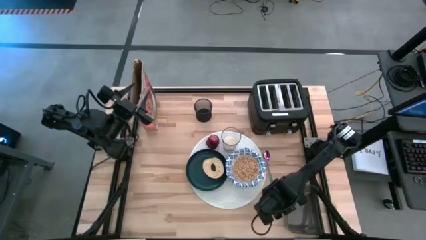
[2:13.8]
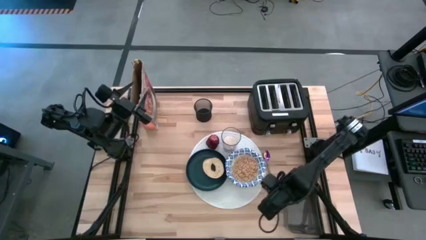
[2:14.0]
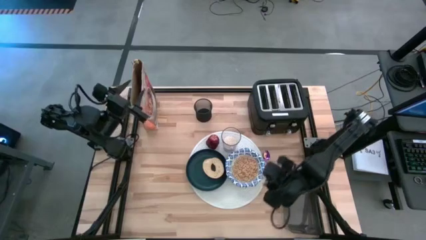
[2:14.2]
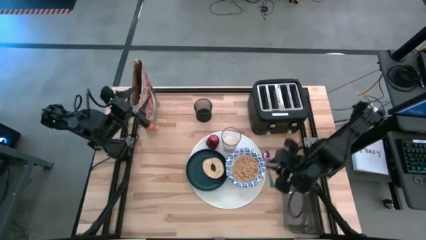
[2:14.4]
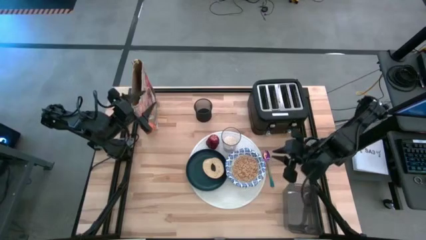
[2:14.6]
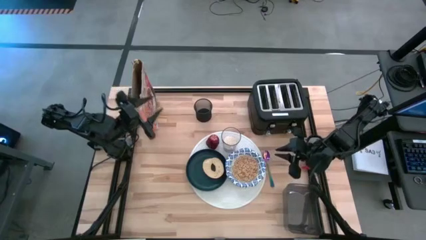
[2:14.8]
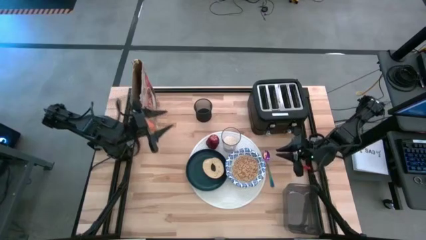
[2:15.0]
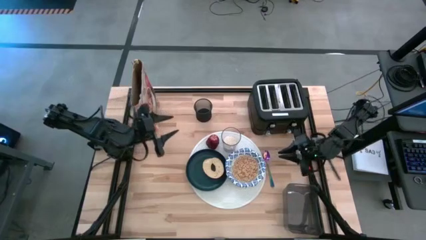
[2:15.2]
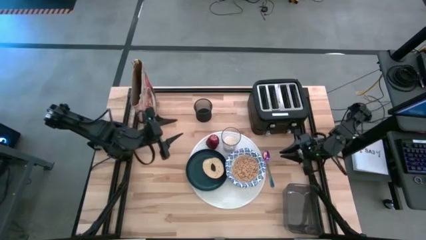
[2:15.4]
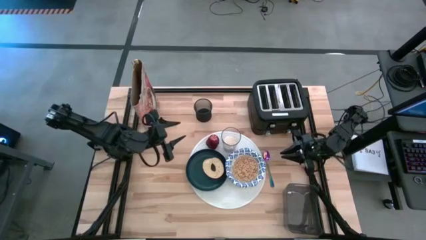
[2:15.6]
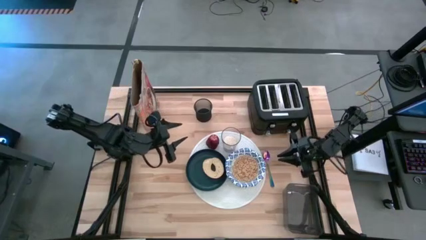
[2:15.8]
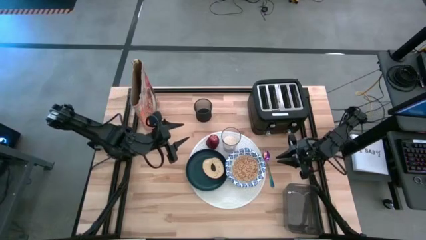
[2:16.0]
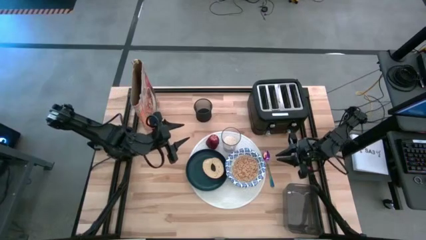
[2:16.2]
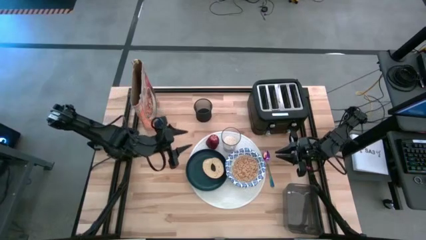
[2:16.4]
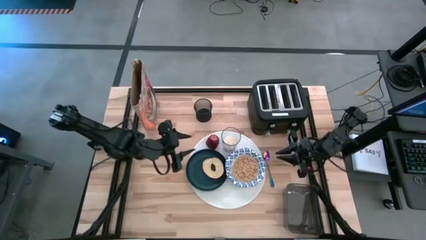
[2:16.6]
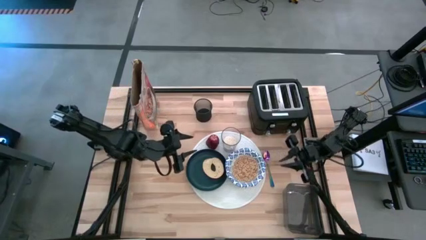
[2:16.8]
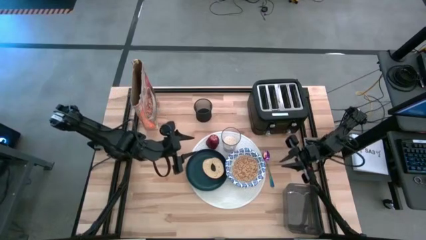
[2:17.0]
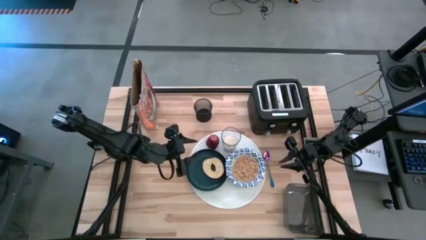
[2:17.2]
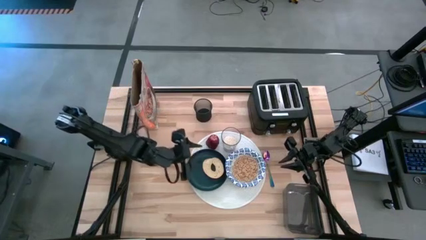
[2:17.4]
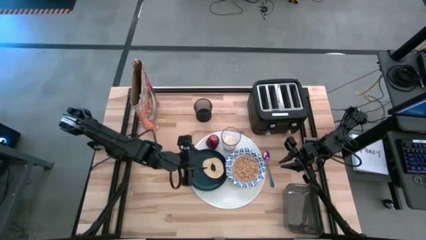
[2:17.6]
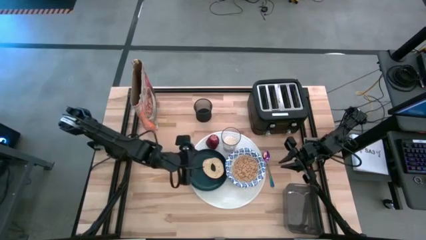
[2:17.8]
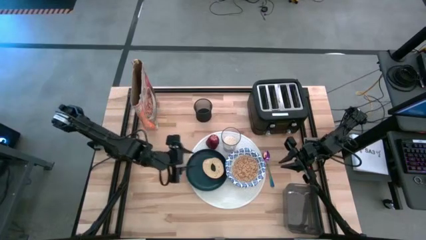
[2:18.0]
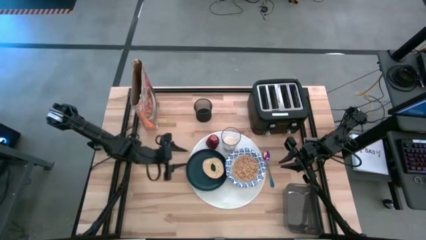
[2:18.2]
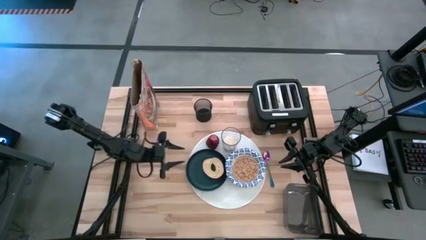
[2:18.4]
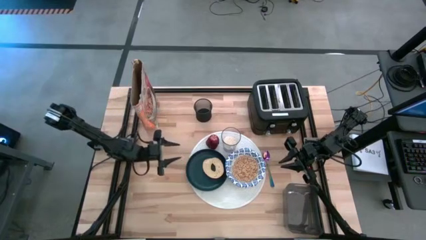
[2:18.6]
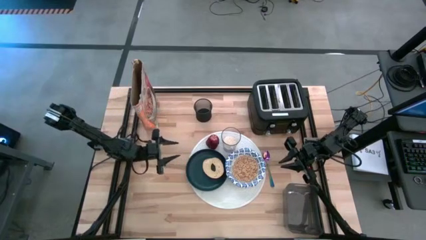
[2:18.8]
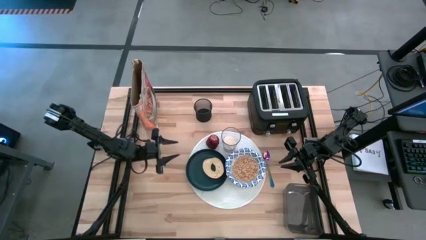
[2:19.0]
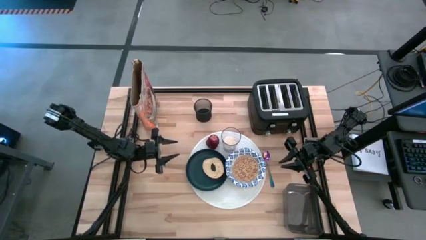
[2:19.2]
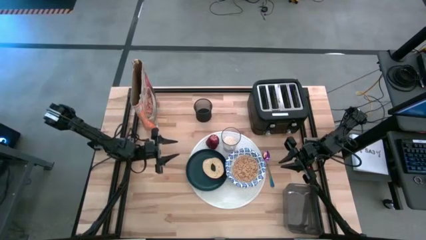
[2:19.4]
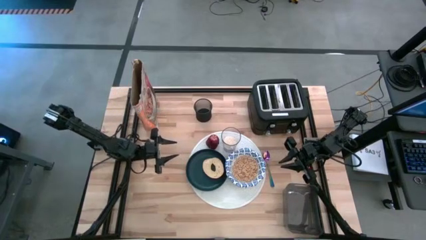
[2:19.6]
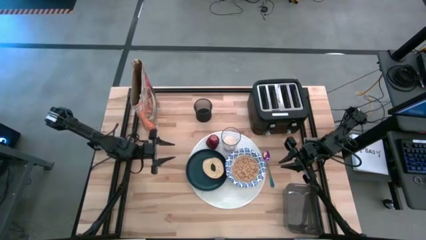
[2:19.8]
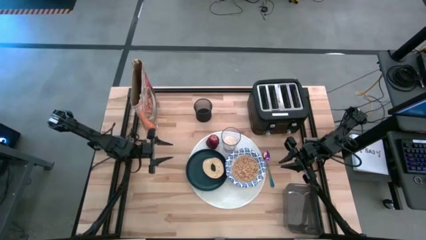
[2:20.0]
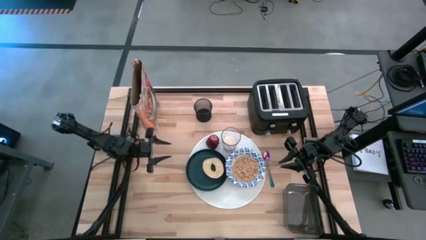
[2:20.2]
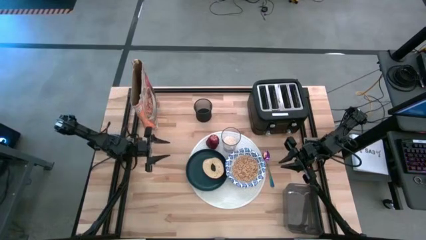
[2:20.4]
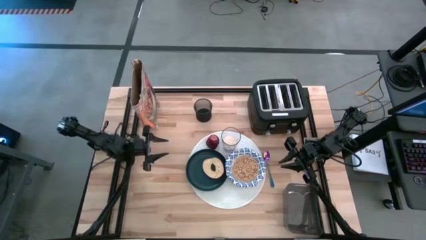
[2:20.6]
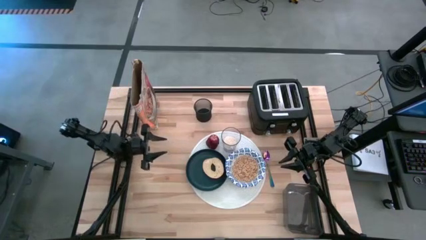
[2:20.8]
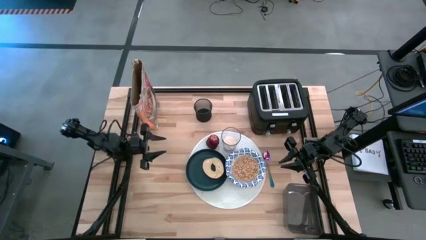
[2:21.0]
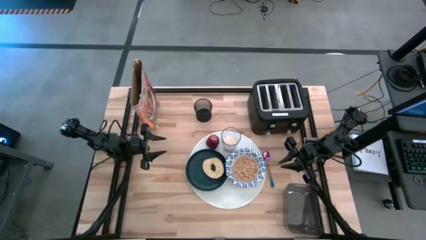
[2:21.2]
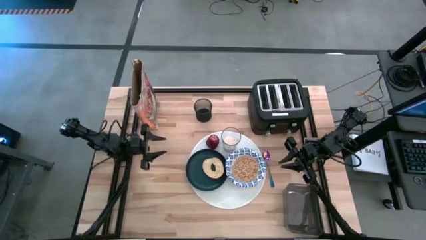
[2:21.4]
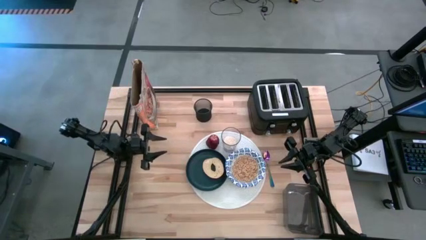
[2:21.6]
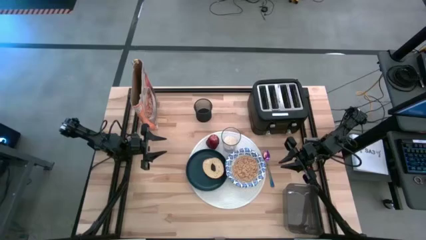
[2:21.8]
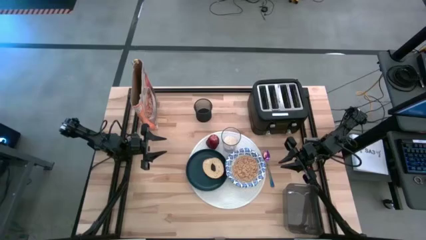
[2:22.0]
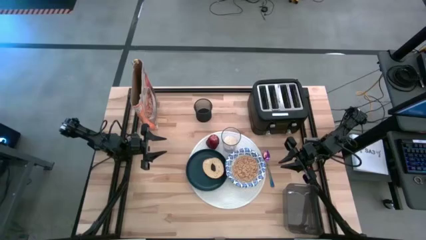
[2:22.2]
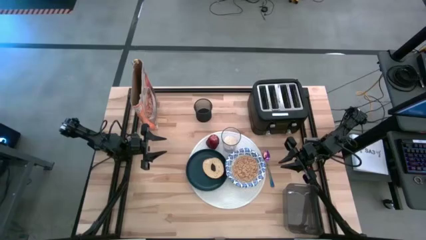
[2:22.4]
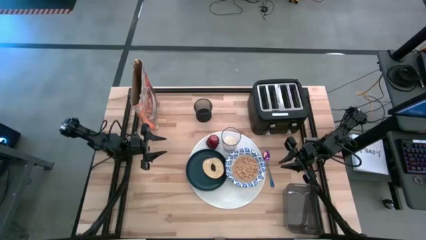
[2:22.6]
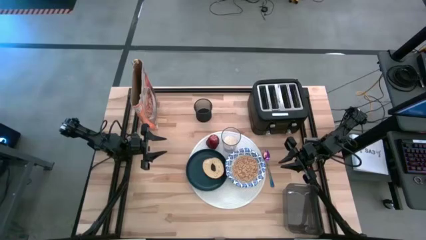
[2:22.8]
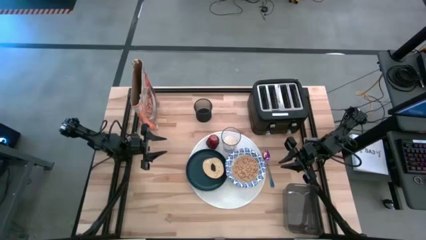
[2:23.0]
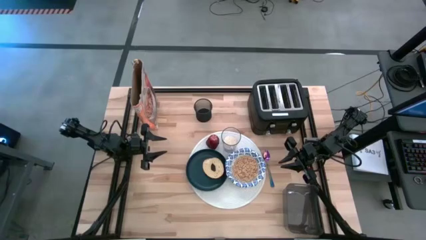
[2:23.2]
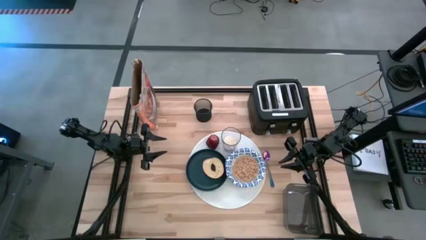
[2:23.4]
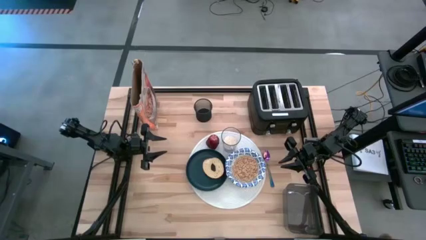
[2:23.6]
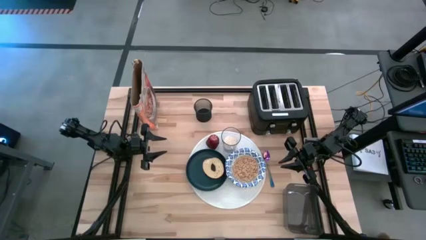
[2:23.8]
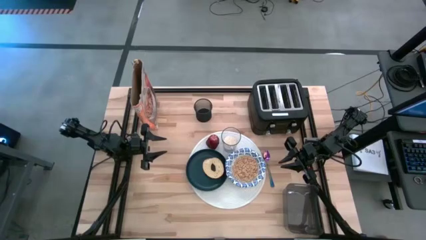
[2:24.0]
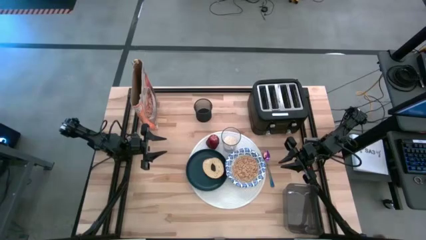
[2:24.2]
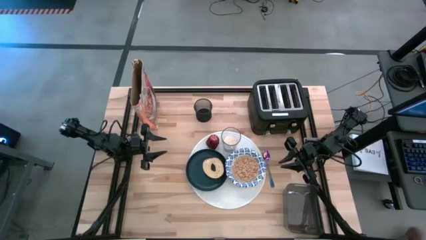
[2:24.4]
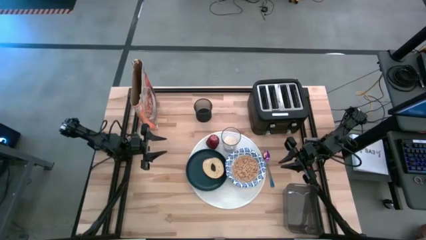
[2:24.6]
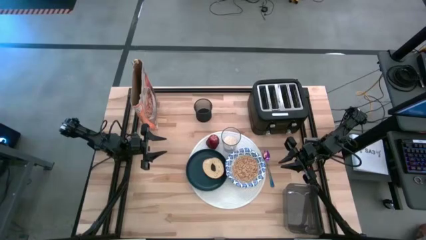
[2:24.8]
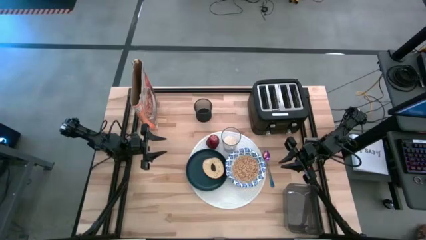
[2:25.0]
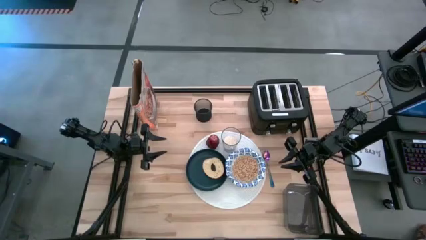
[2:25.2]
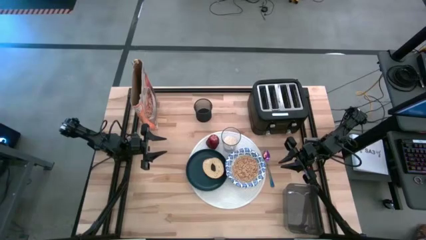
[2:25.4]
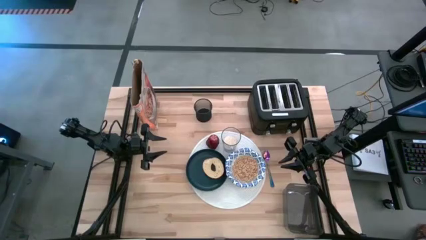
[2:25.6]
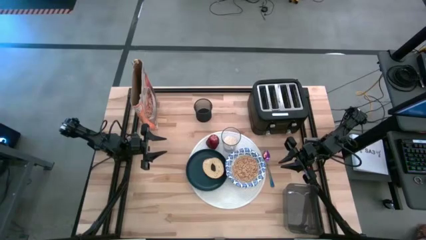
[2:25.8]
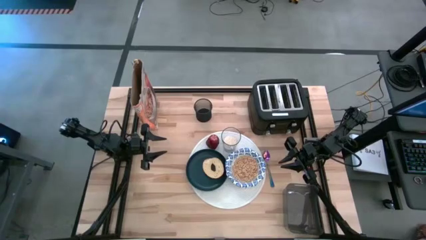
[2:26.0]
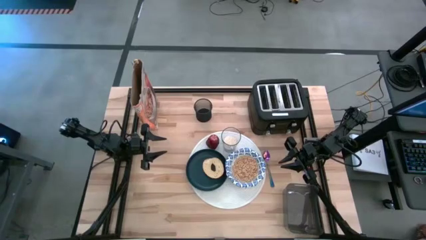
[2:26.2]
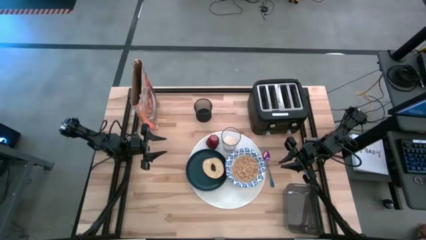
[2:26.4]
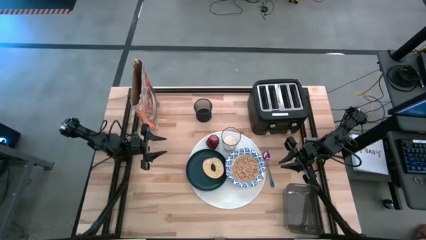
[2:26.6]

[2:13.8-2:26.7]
Task: Arrange a breakfast setting
Return to Home Position

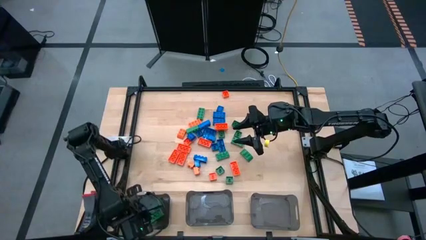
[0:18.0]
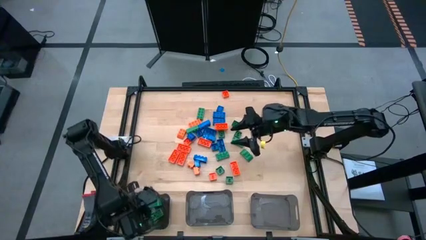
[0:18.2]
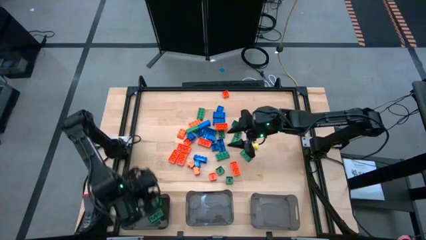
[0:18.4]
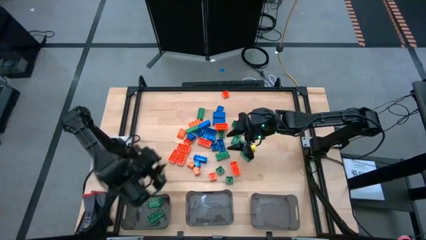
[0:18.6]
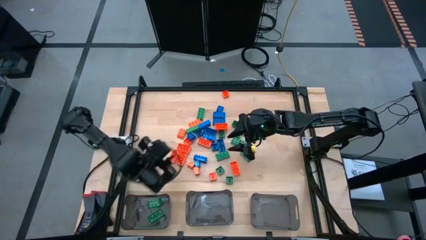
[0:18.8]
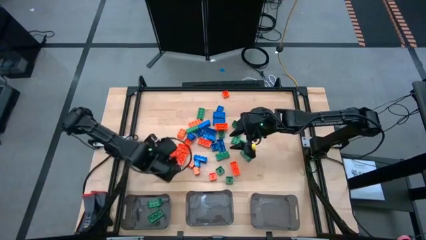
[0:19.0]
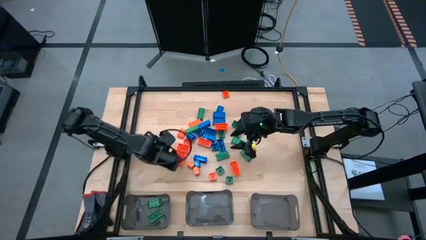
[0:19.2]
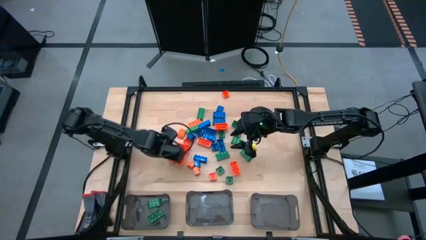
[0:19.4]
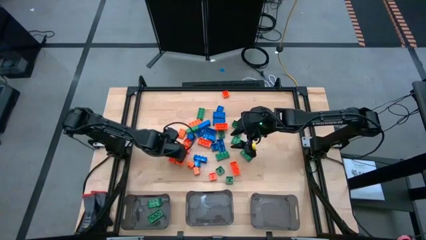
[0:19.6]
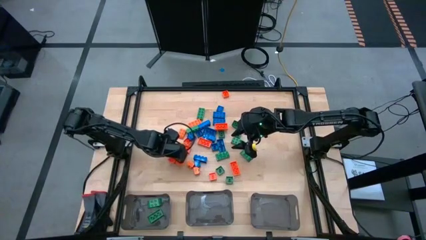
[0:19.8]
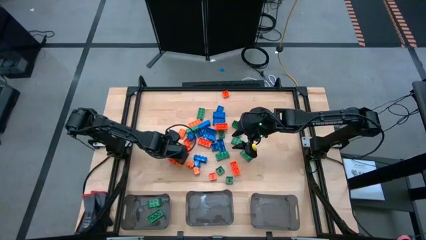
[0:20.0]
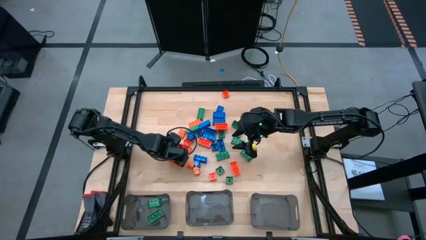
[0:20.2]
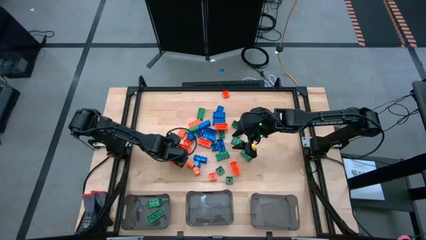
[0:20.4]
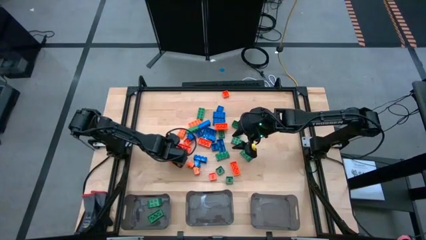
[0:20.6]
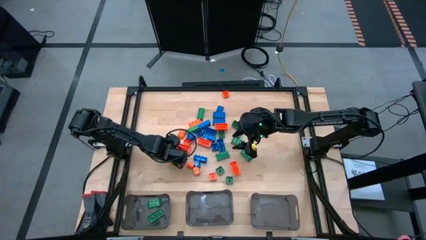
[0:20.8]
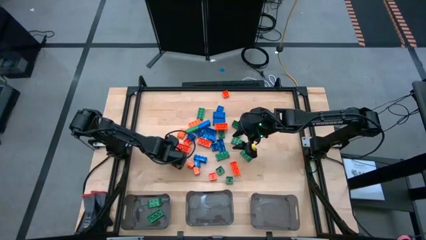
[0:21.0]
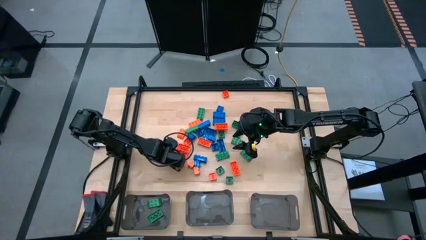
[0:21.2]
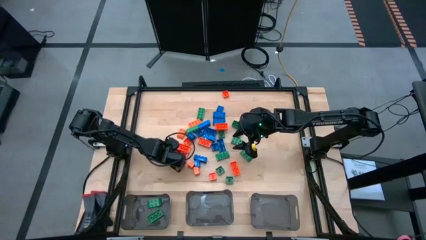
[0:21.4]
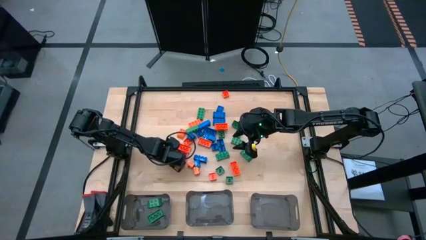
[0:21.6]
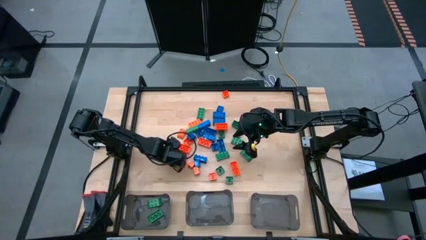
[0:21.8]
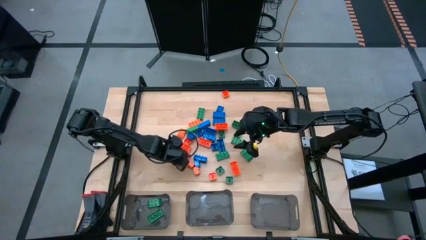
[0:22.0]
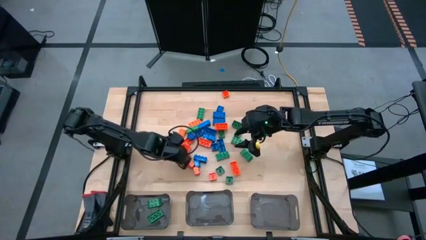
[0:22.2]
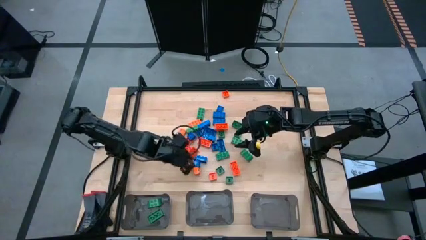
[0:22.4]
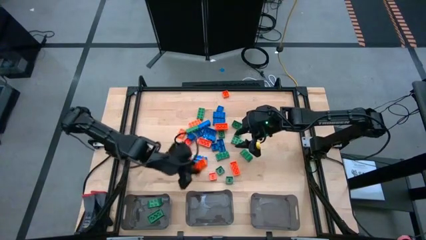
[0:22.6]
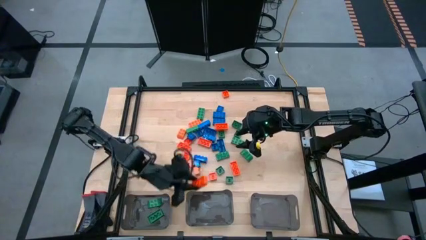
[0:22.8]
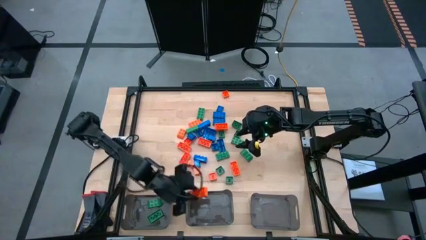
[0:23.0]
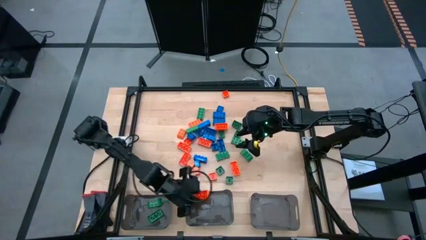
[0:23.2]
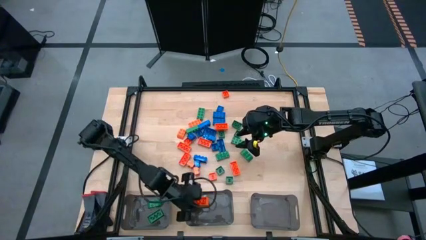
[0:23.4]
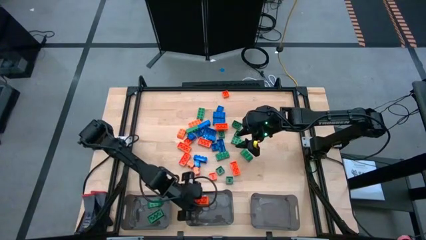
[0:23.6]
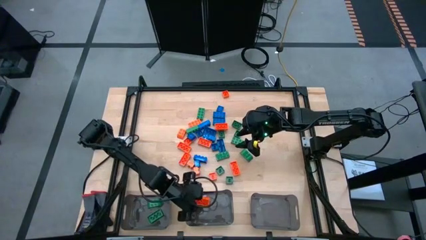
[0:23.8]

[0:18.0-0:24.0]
Task: Sort blocks
Put the orange game piece into the middle black bin
